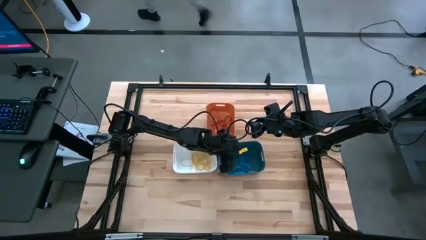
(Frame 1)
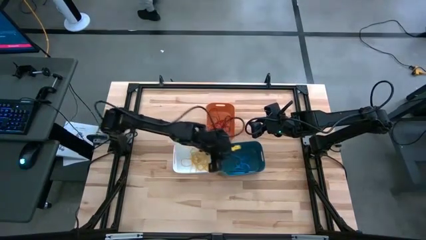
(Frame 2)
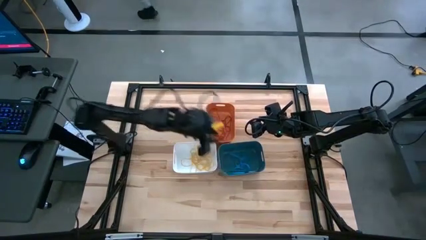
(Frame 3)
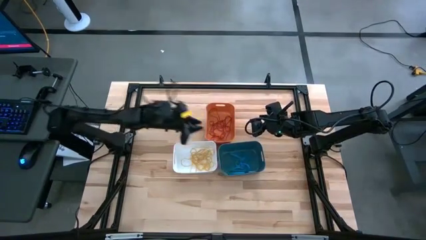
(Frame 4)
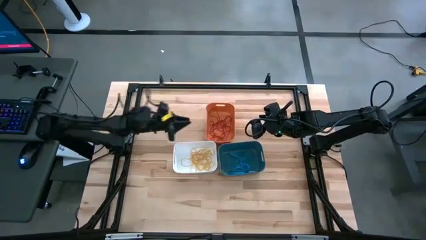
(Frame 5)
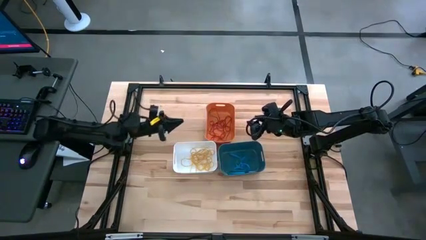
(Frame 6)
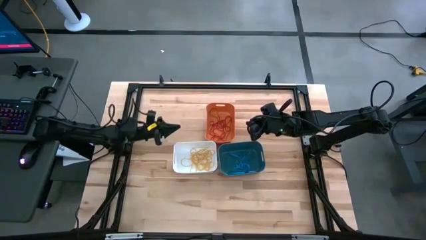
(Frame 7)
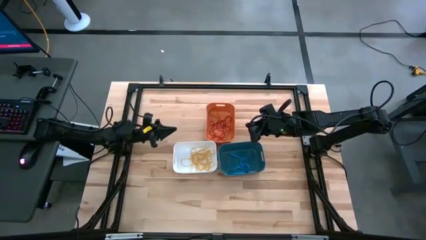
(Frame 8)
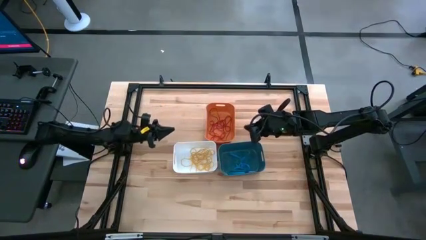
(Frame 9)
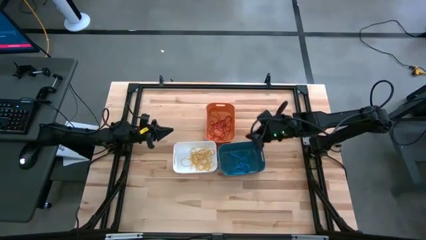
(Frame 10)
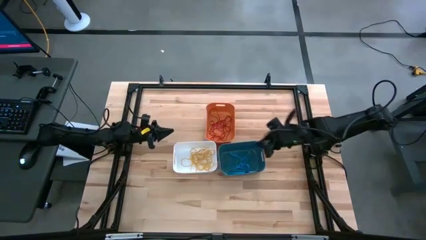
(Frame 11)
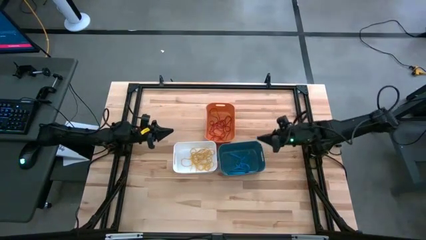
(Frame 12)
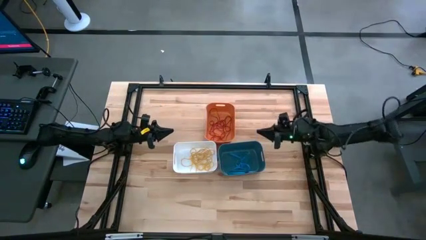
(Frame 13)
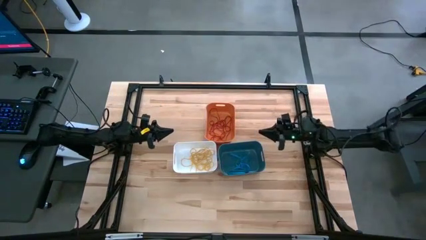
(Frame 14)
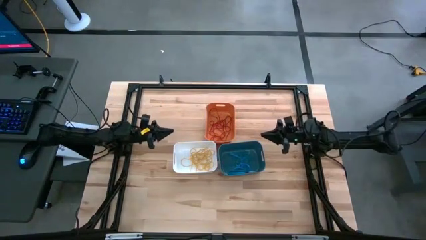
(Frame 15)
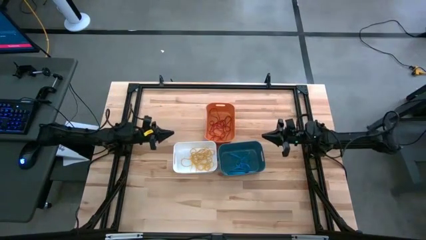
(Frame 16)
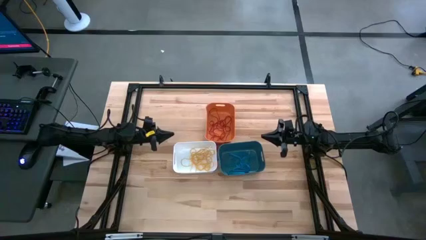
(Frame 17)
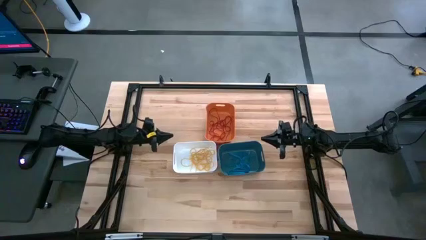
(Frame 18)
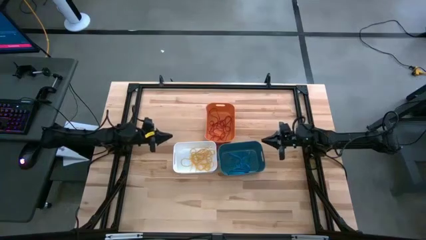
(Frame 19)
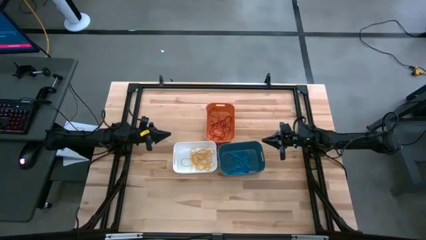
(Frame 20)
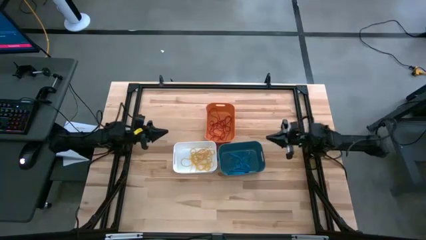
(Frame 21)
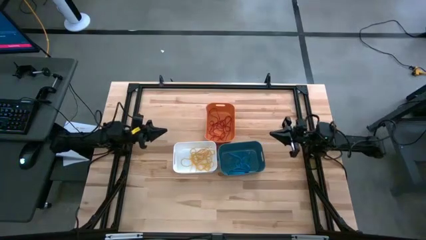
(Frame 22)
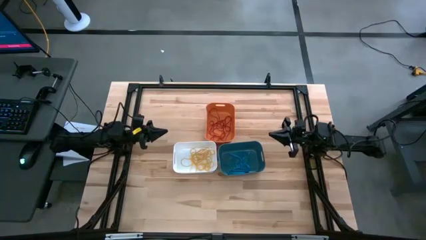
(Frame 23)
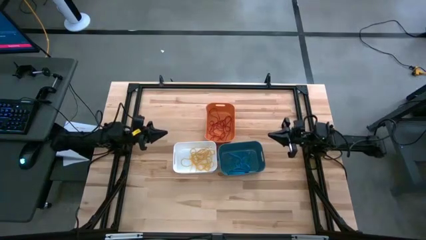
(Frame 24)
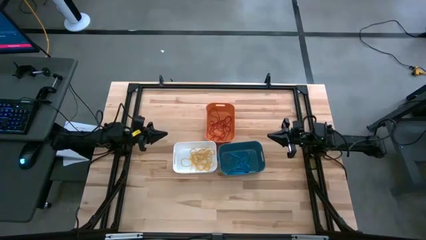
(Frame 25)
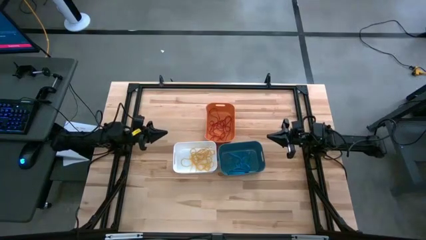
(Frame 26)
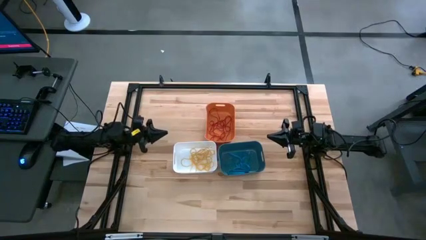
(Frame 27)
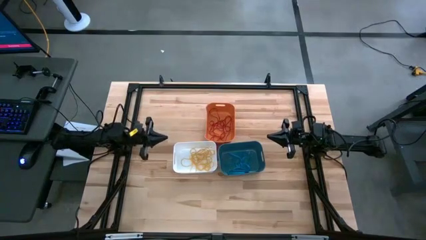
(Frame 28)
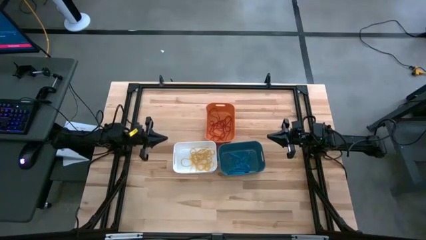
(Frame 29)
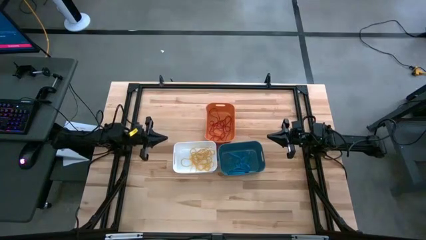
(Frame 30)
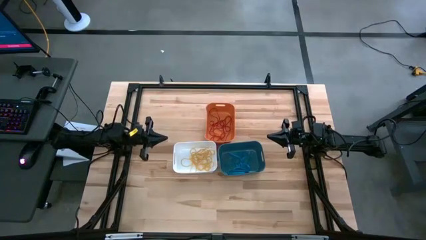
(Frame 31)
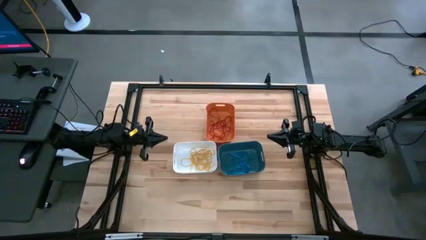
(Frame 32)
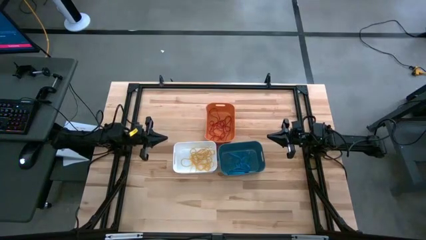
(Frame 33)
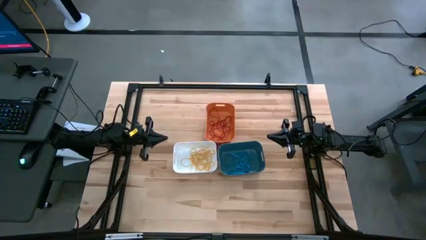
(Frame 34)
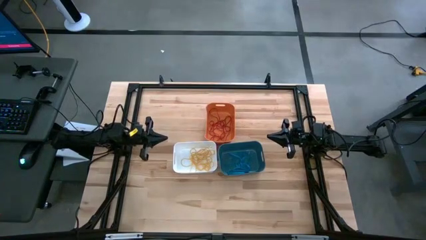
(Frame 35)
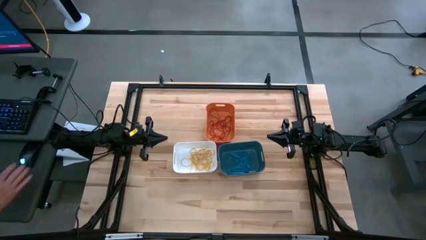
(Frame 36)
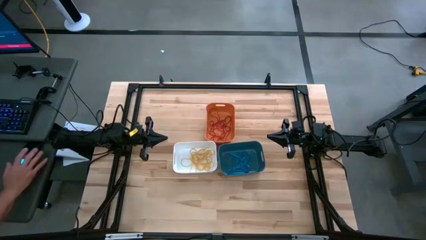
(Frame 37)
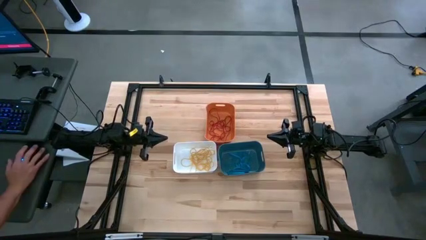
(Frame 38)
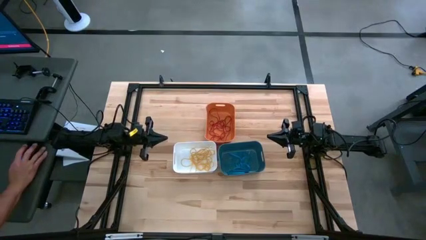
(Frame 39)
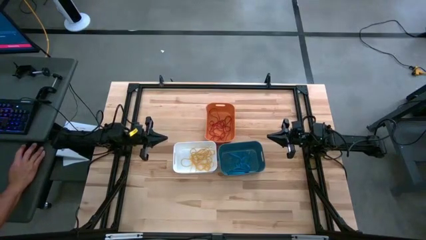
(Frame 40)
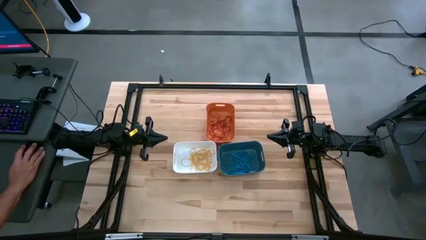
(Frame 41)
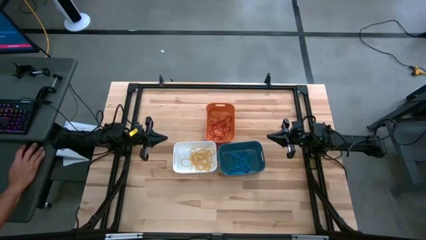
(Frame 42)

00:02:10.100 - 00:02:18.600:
Task: Sort rubber bands into baskets
Return to Home Position

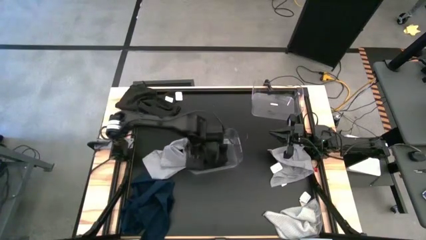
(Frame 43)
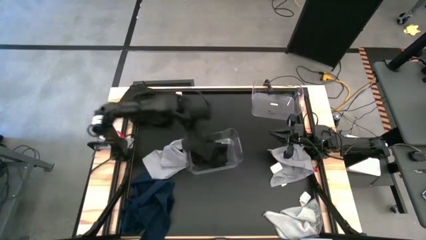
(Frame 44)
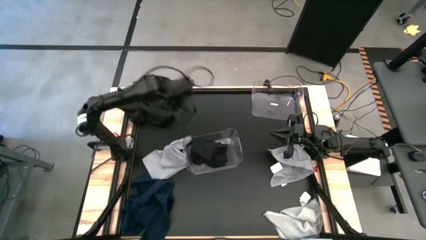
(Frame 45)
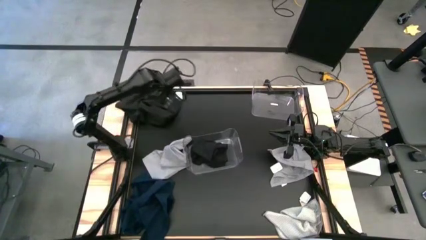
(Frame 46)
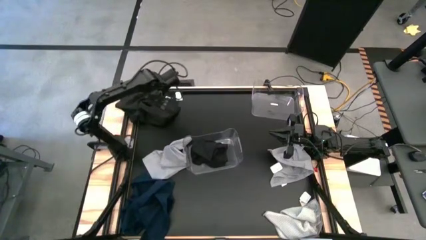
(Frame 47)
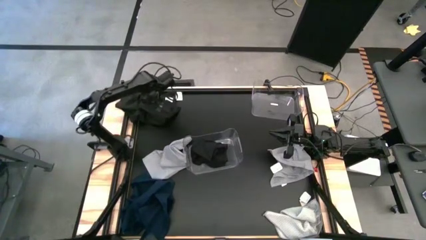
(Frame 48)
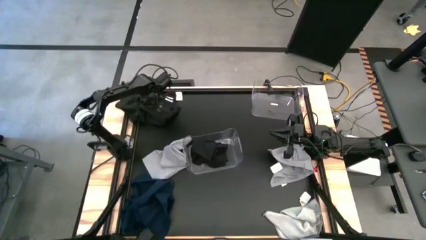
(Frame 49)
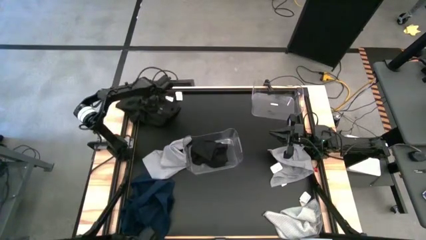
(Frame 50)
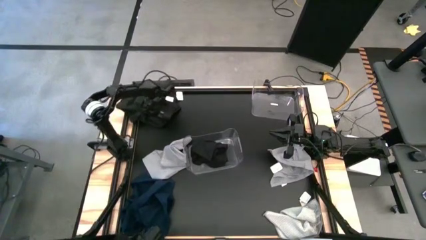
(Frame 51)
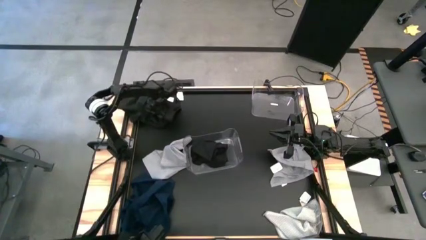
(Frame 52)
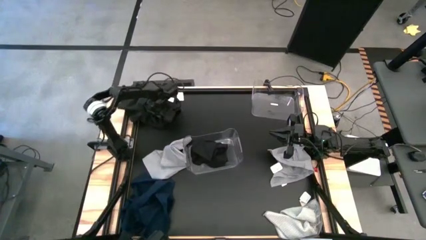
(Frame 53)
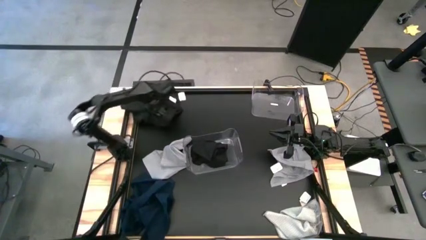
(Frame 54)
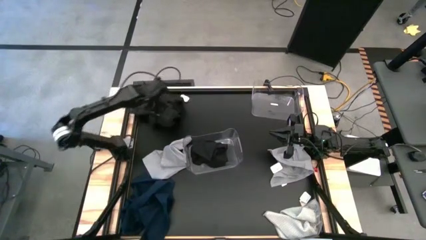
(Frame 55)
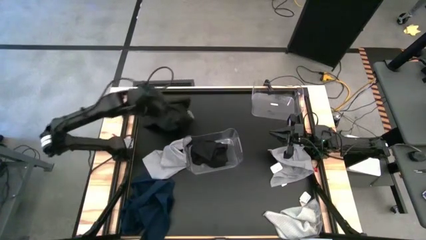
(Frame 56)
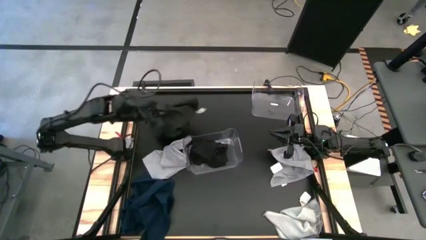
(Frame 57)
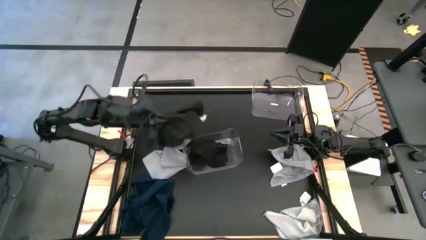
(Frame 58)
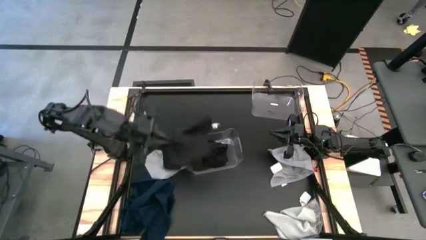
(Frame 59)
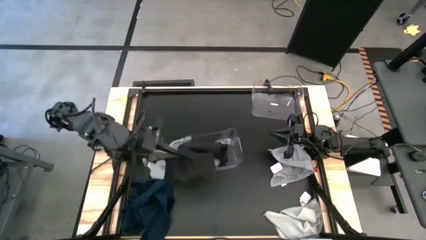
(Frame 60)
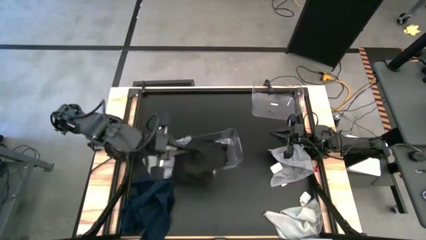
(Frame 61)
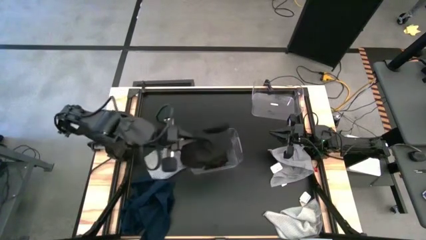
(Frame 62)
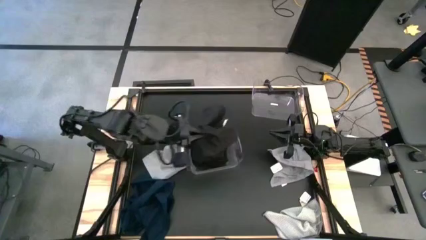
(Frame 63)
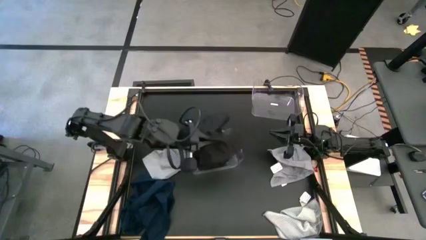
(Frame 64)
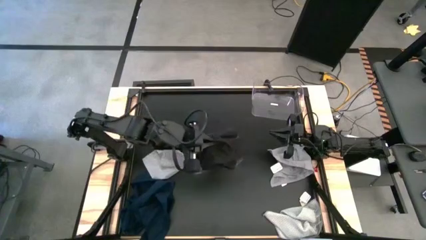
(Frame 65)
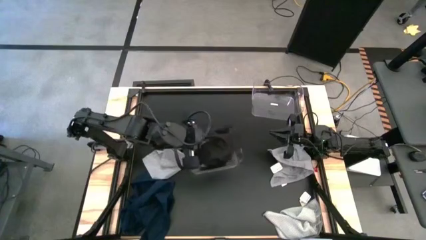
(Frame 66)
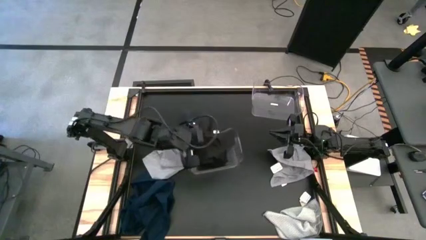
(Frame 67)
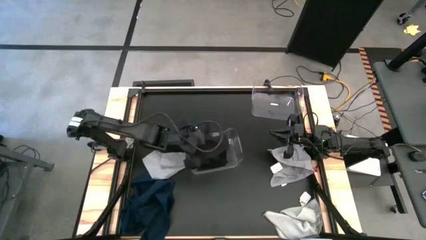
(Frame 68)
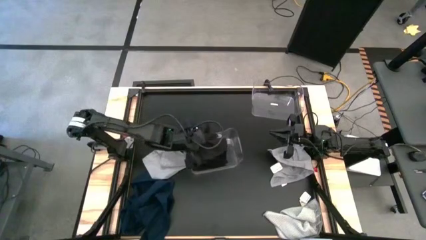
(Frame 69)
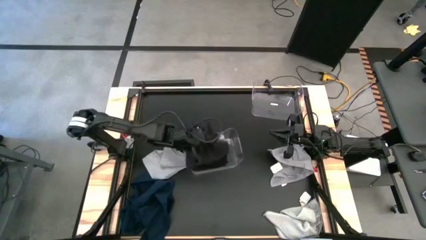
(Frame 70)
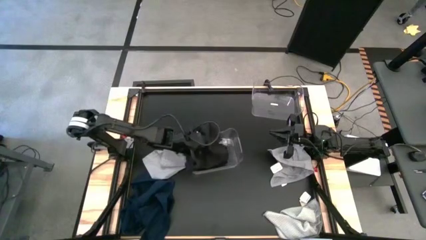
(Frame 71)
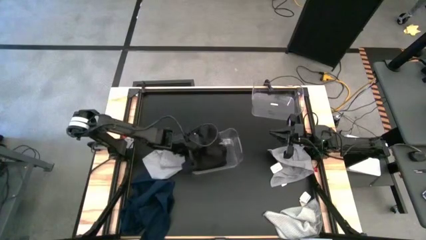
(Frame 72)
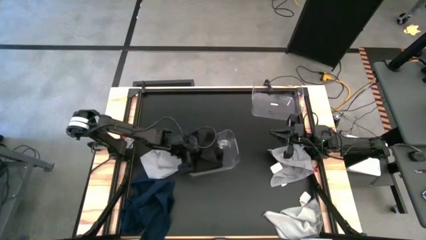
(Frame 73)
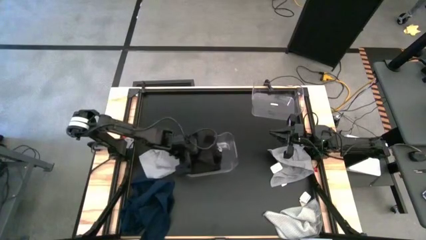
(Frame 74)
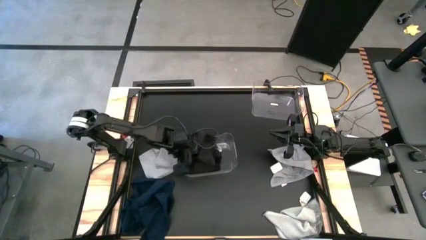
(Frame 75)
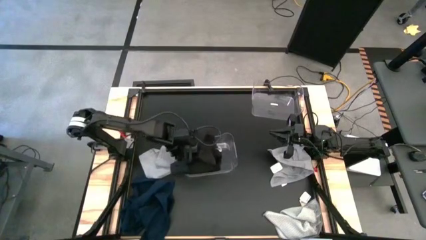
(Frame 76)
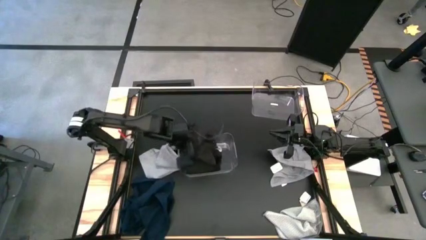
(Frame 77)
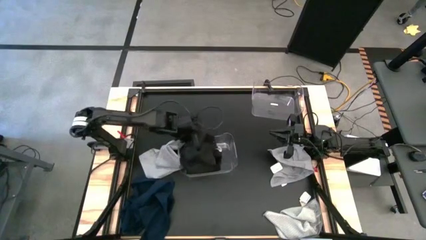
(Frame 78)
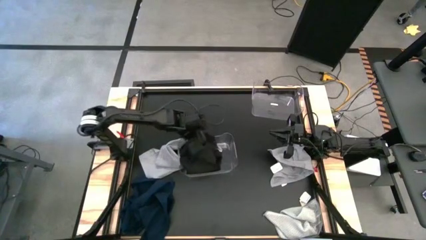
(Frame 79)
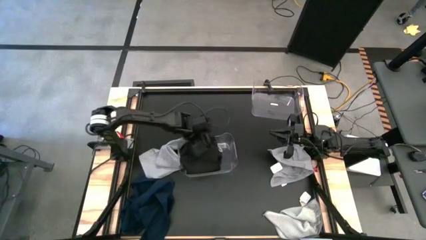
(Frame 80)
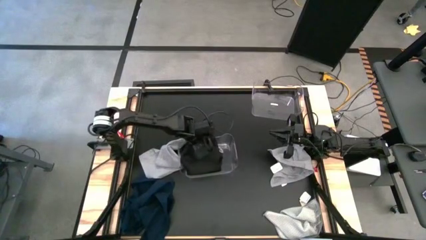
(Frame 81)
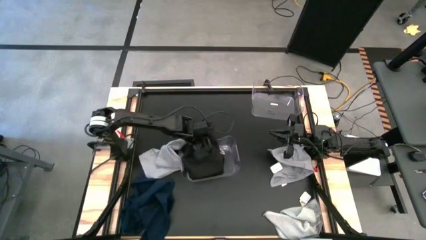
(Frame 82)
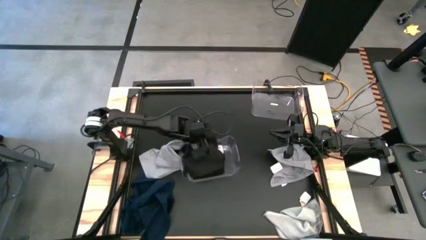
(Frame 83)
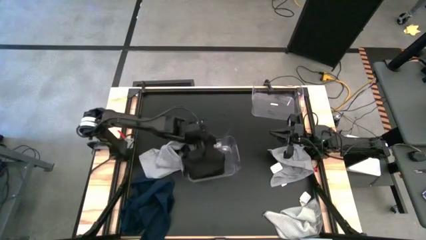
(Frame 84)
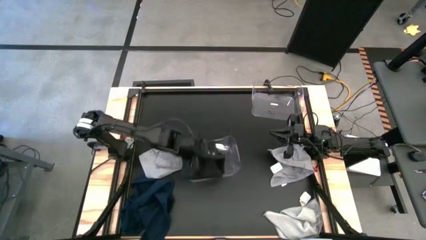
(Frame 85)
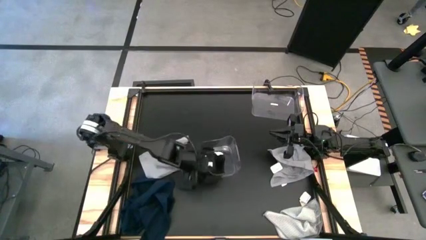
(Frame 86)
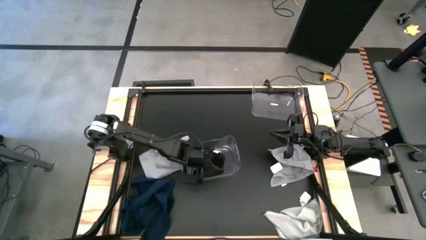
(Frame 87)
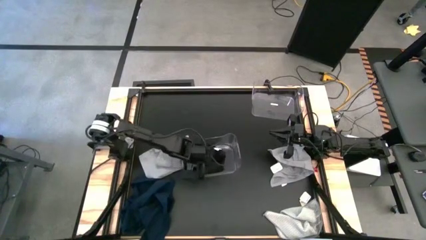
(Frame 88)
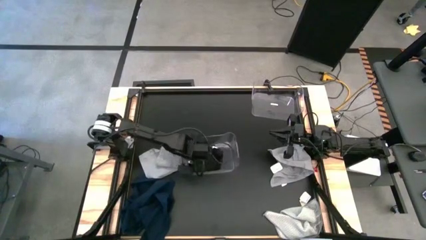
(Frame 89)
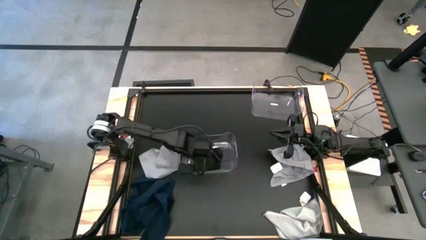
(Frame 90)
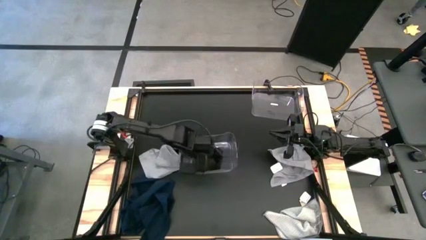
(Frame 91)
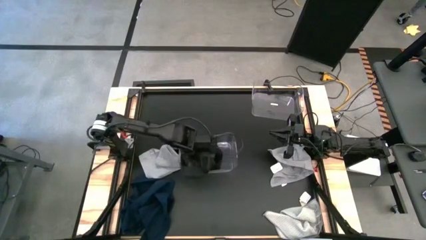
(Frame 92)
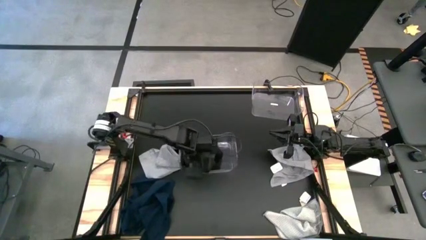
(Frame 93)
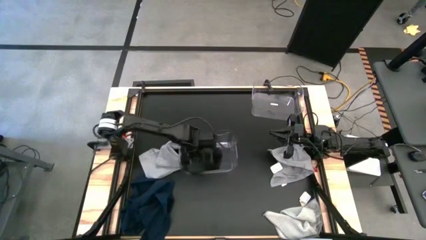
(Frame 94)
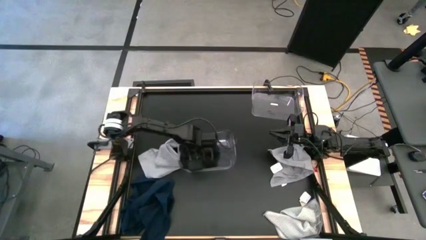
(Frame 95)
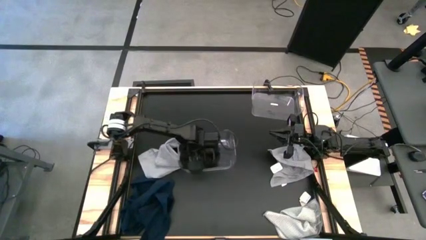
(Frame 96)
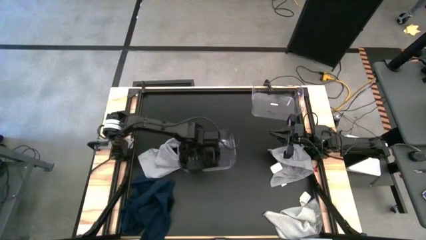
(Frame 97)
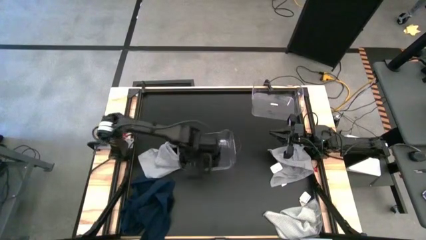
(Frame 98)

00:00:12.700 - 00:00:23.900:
Task: Sort towels by color in basket
Put the black towel into the bottom transparent bin
